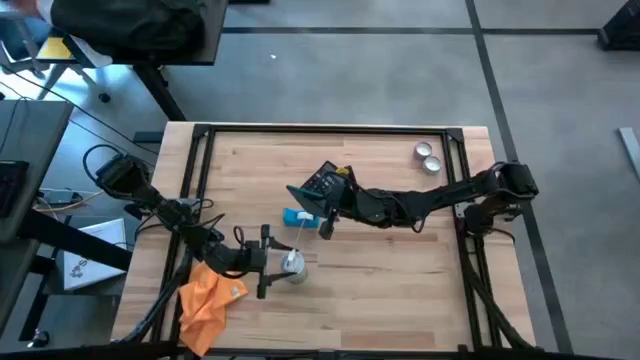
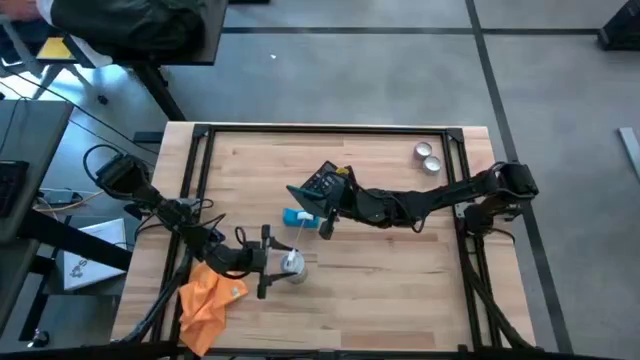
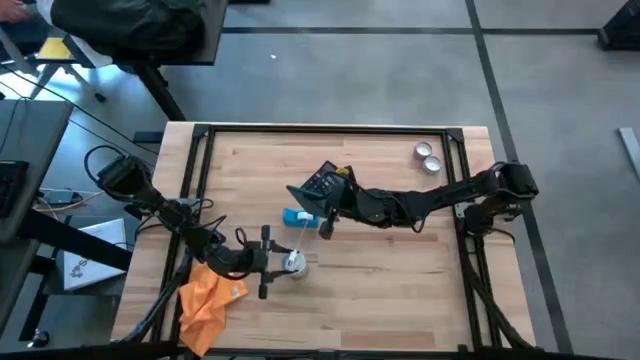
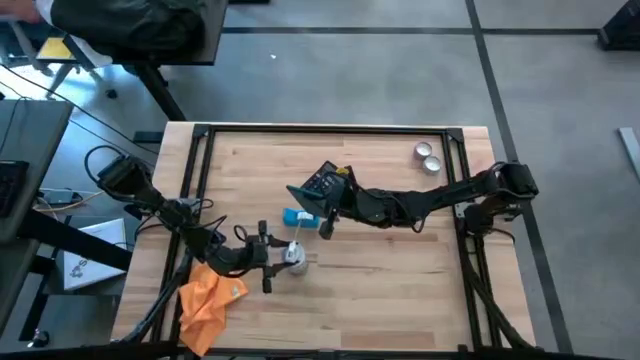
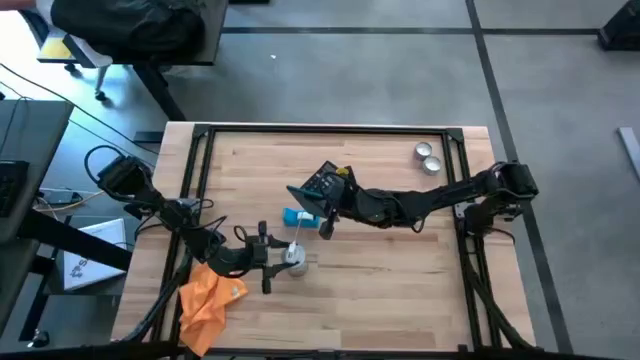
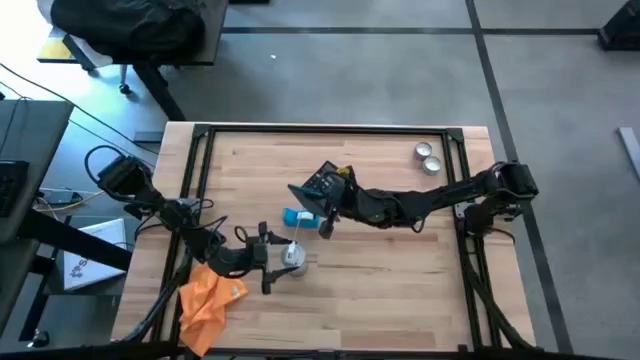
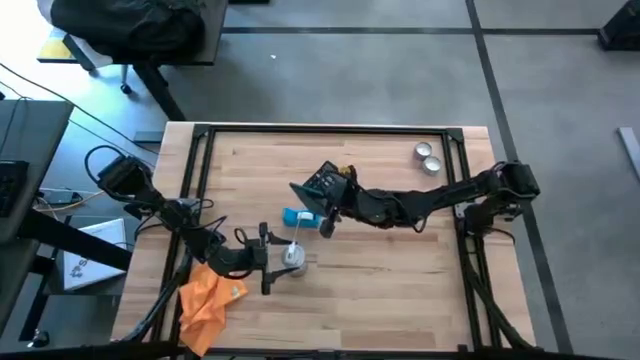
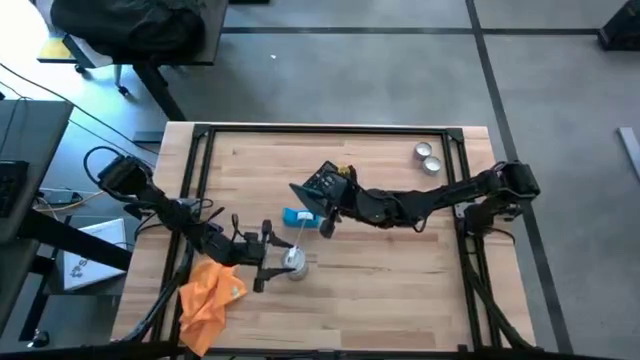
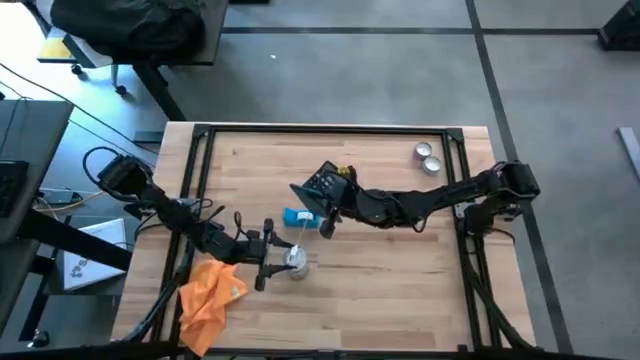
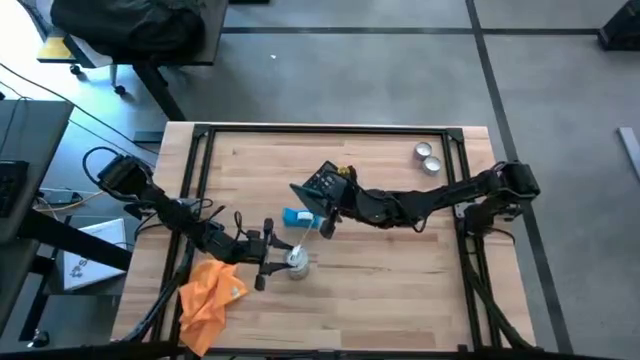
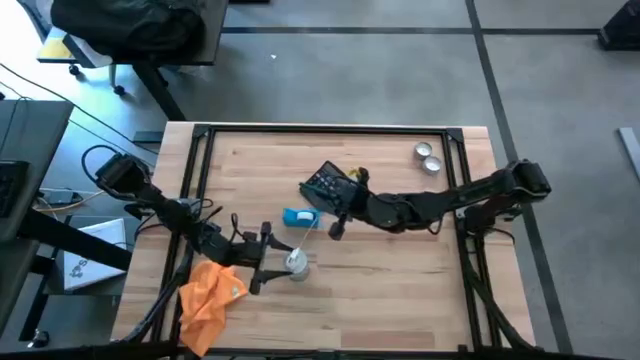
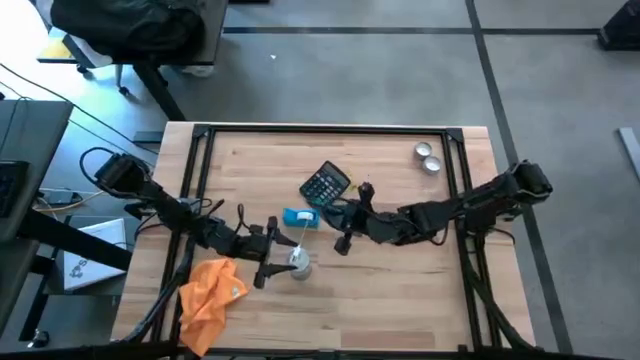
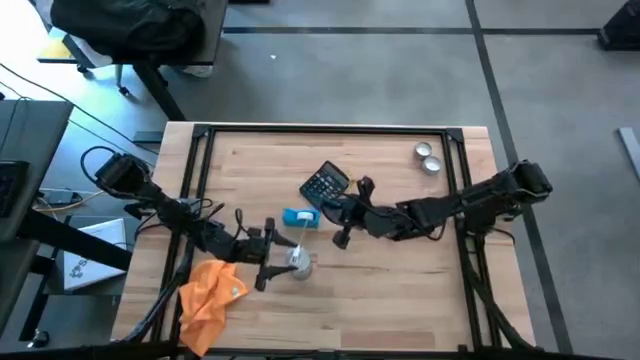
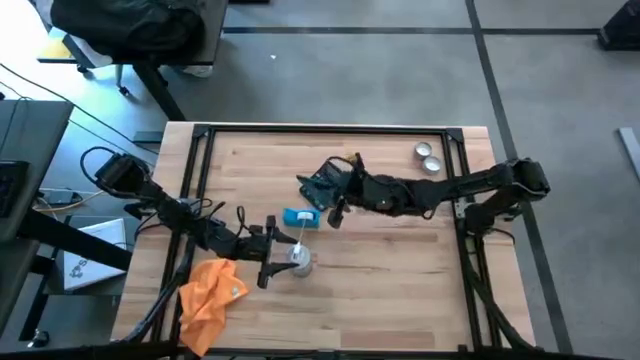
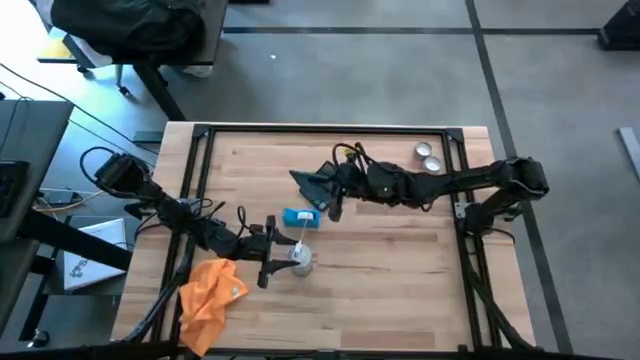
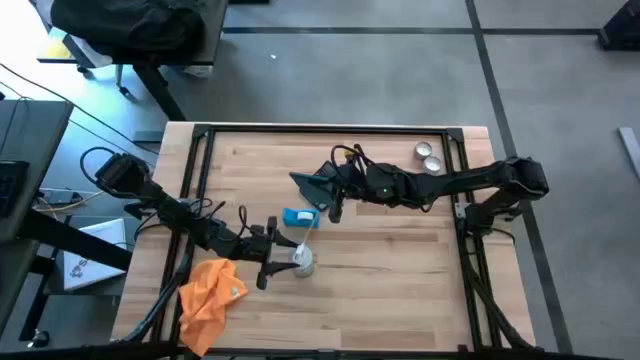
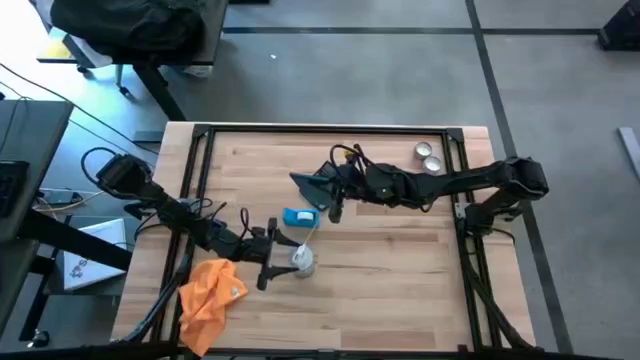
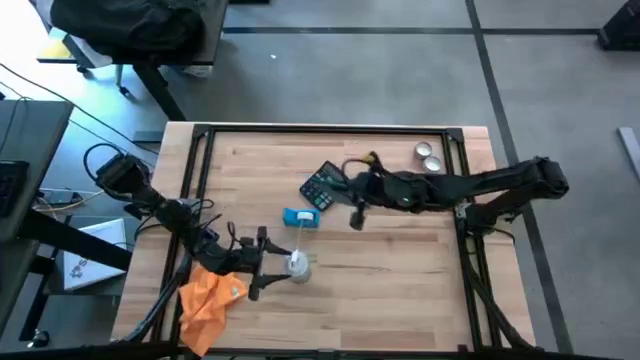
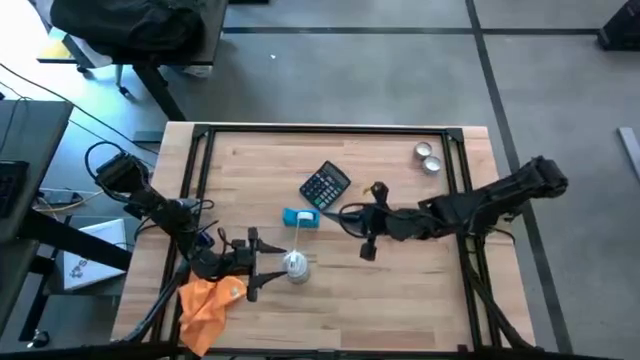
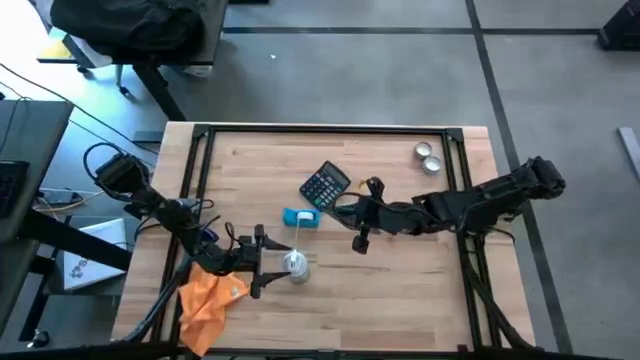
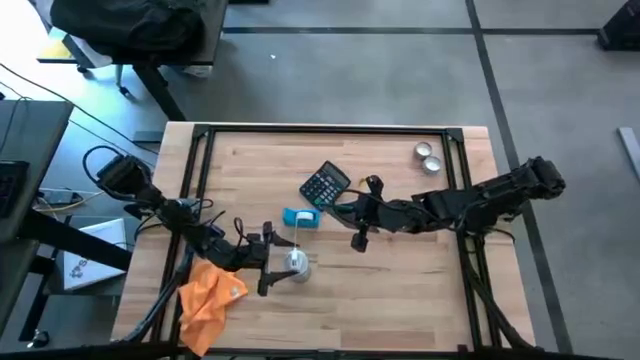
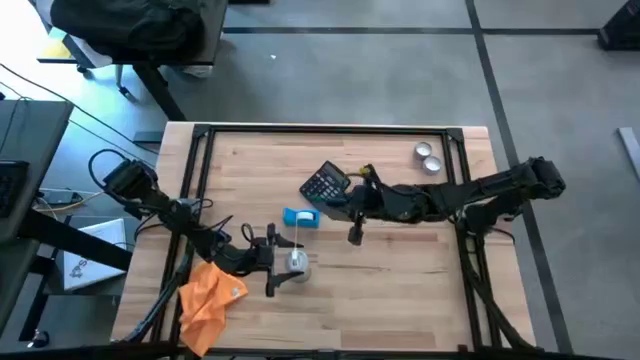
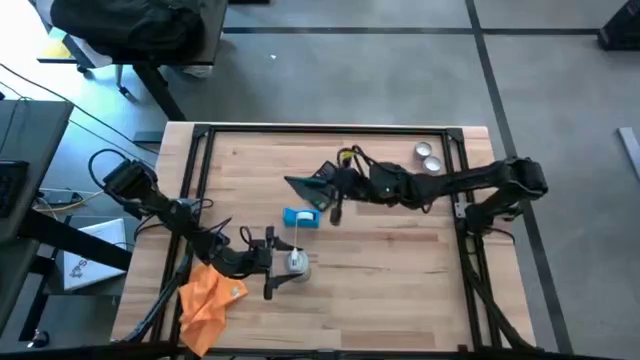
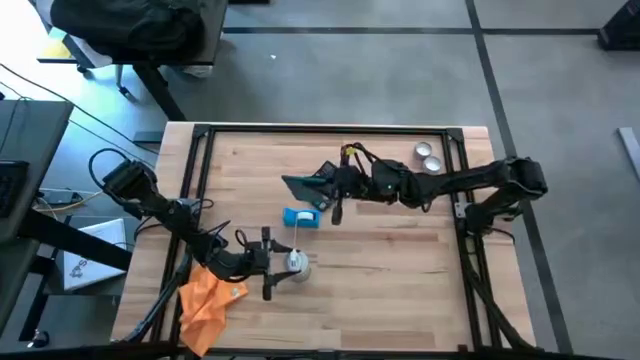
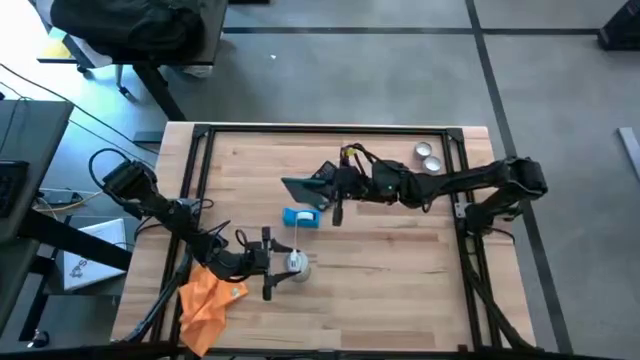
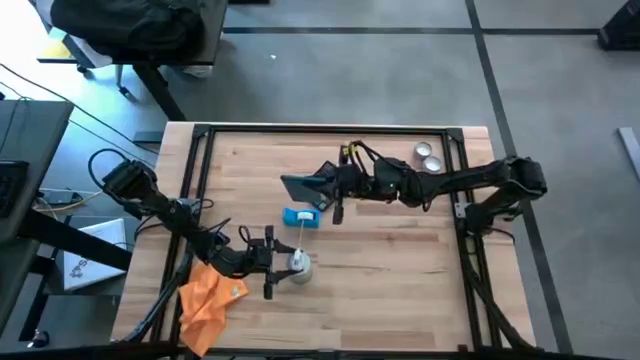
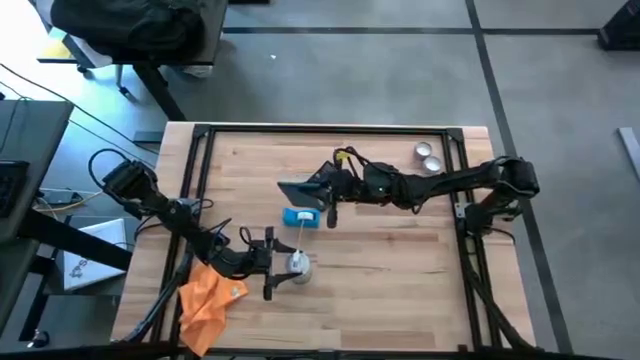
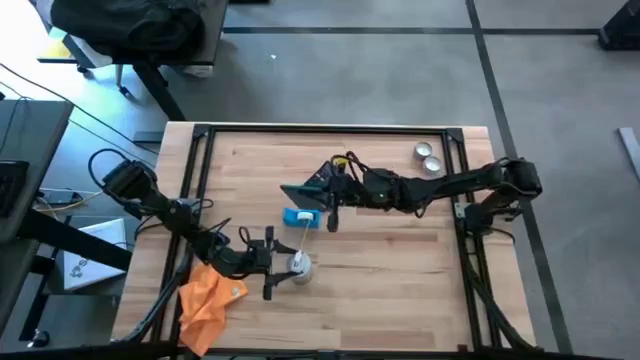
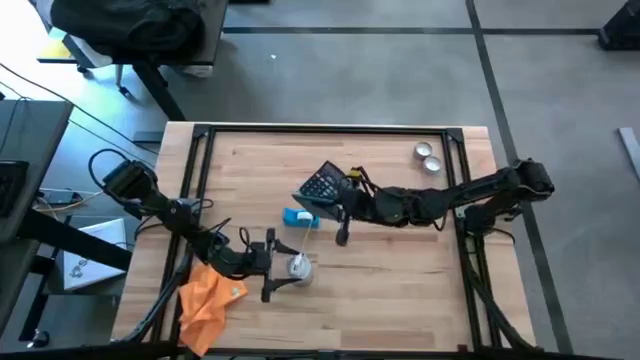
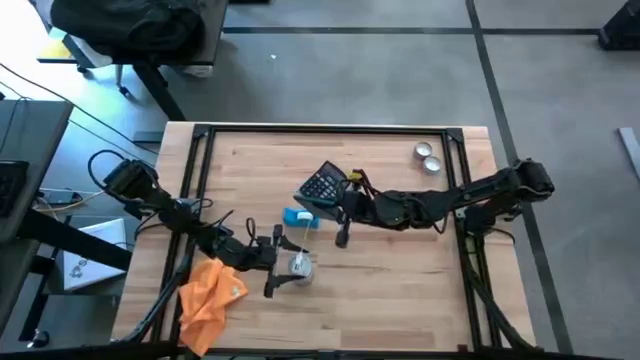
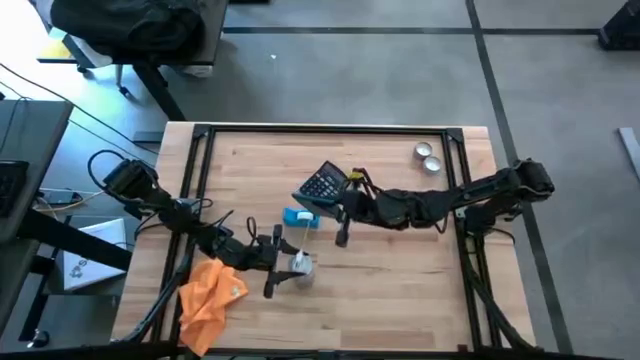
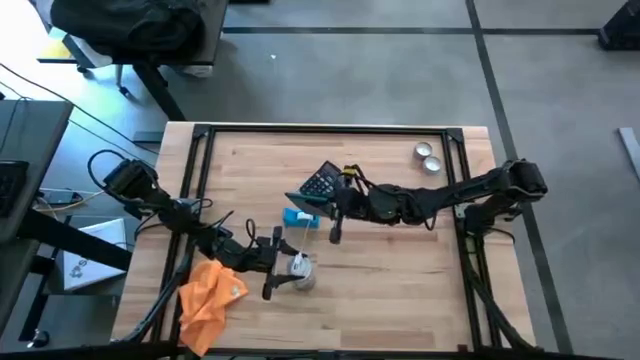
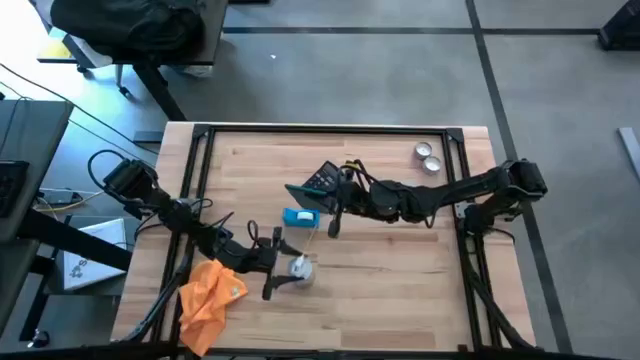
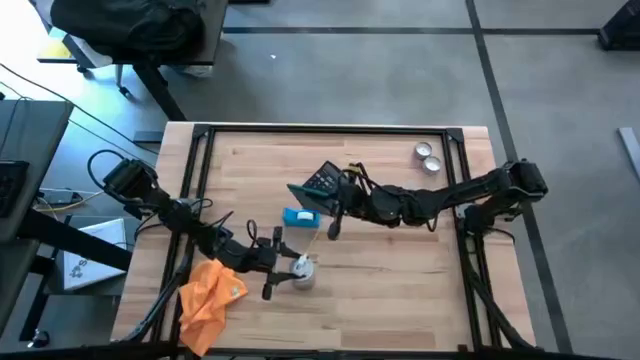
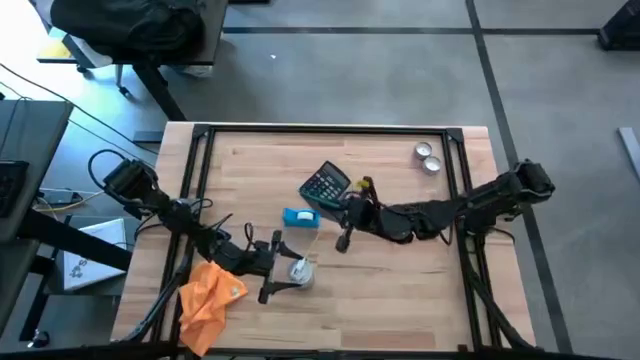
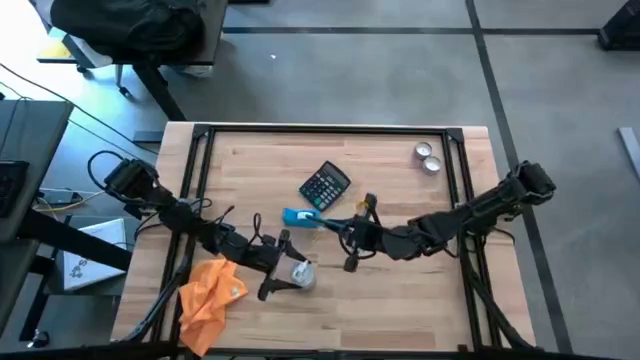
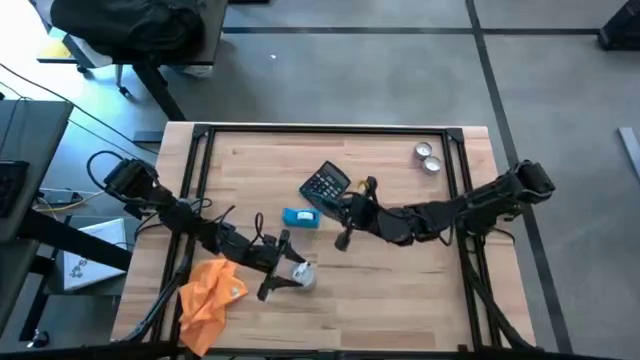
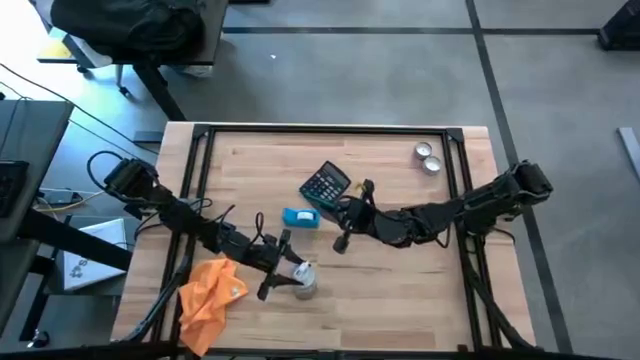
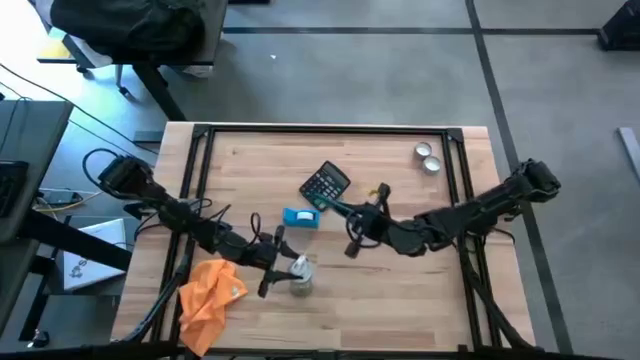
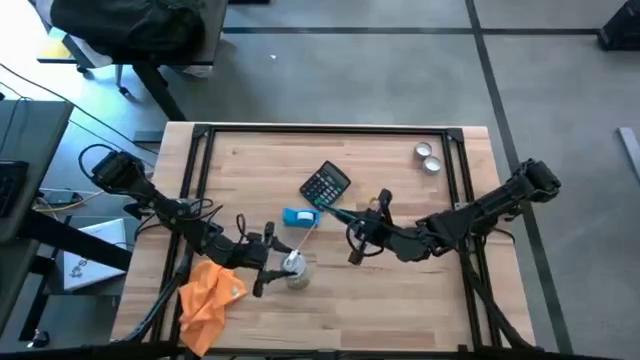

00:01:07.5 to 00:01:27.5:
Task: Apply microfiber cloth
Spray the cellphone using the white spray bottle
